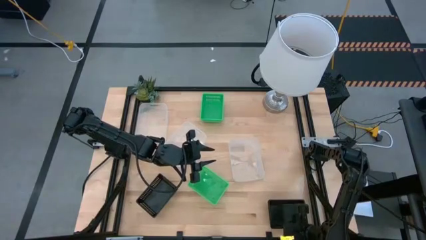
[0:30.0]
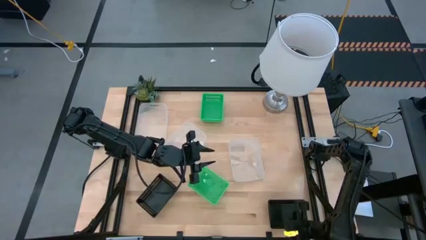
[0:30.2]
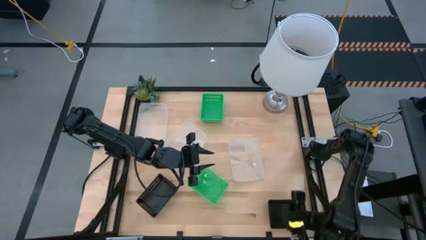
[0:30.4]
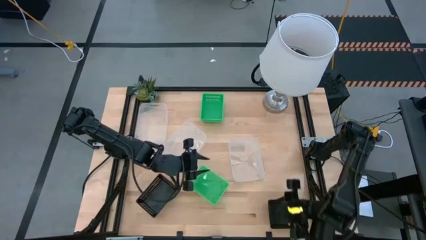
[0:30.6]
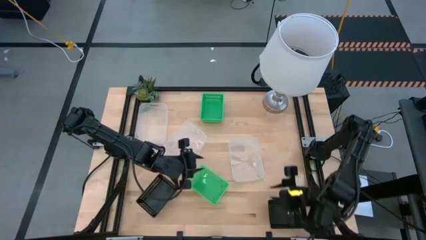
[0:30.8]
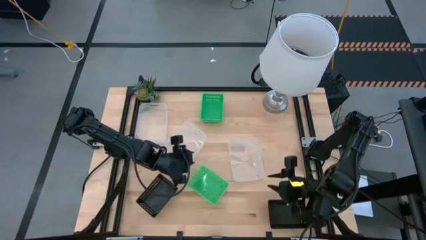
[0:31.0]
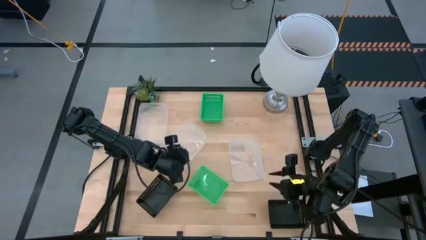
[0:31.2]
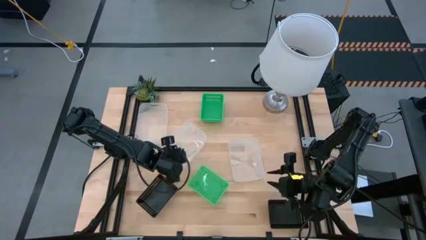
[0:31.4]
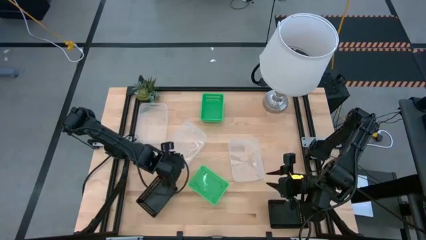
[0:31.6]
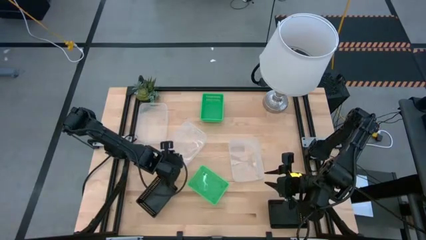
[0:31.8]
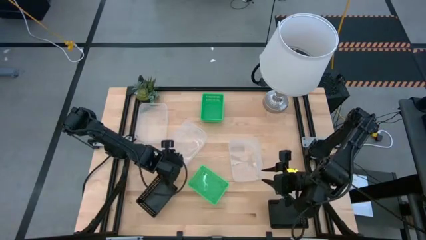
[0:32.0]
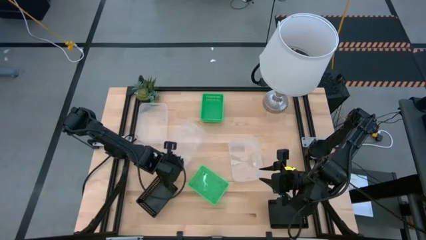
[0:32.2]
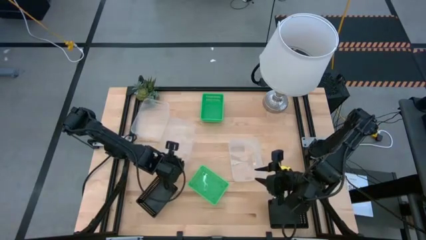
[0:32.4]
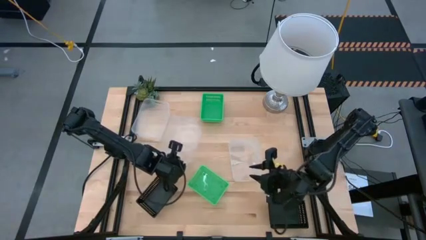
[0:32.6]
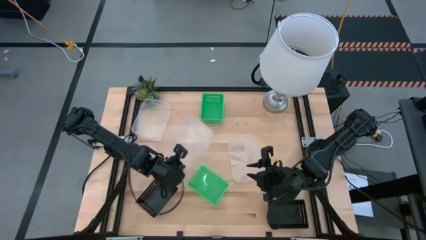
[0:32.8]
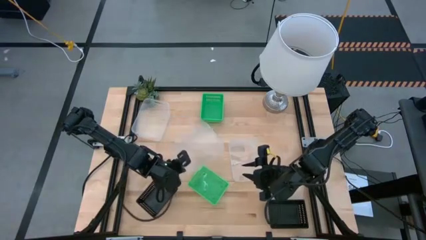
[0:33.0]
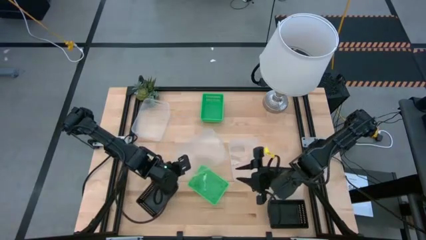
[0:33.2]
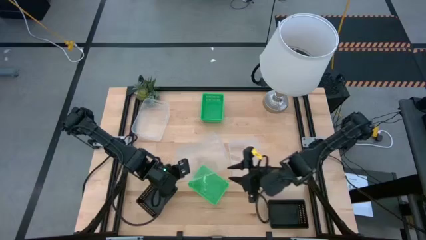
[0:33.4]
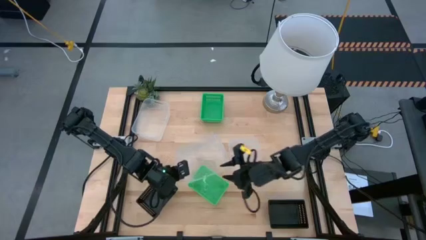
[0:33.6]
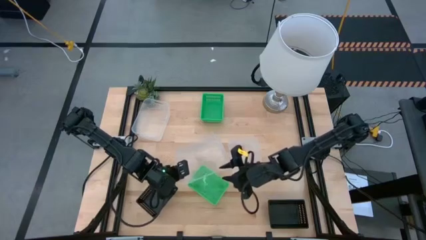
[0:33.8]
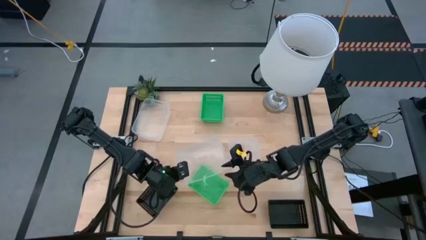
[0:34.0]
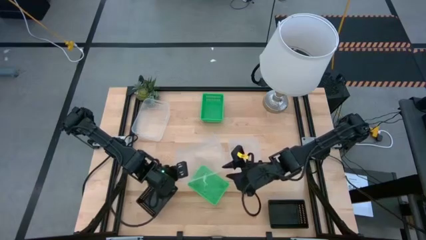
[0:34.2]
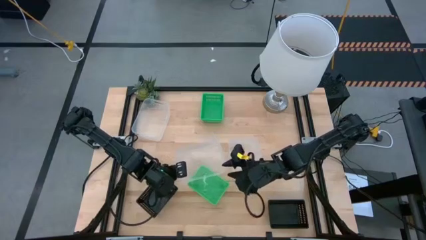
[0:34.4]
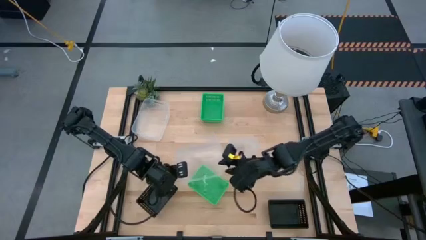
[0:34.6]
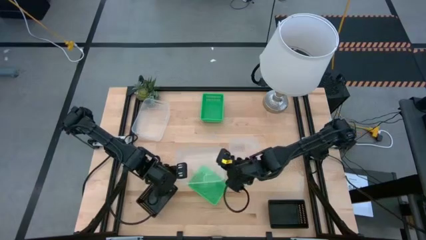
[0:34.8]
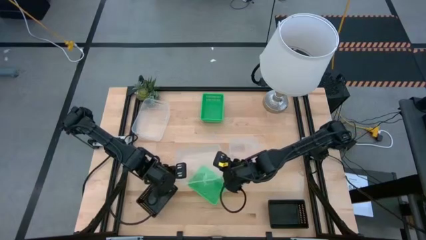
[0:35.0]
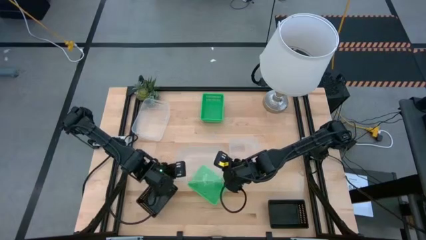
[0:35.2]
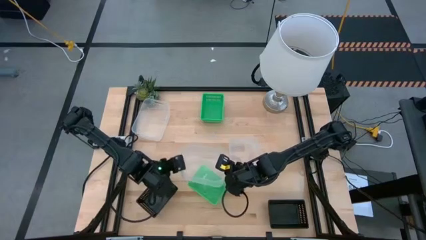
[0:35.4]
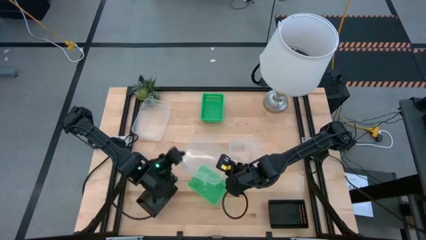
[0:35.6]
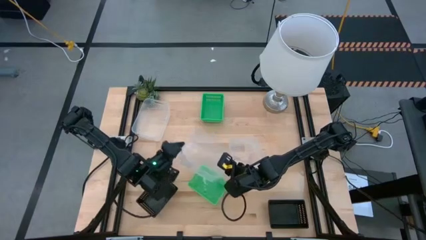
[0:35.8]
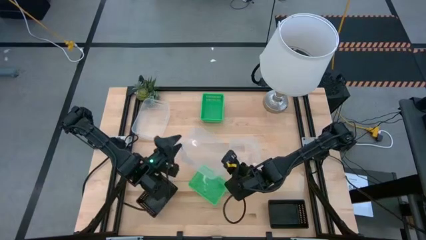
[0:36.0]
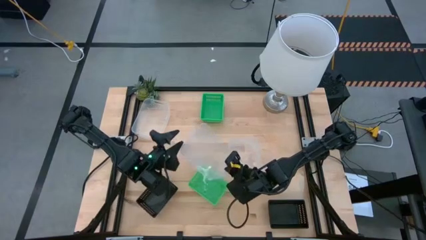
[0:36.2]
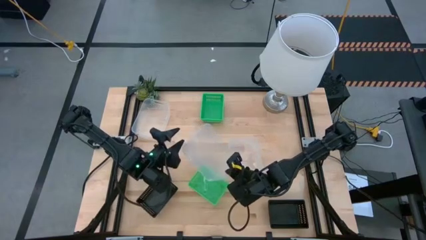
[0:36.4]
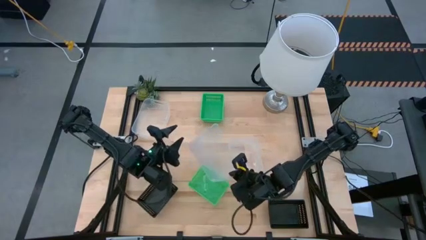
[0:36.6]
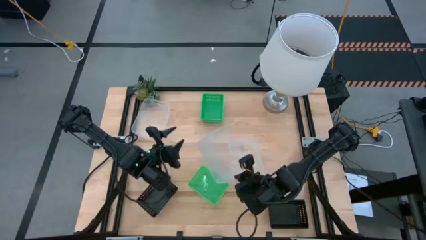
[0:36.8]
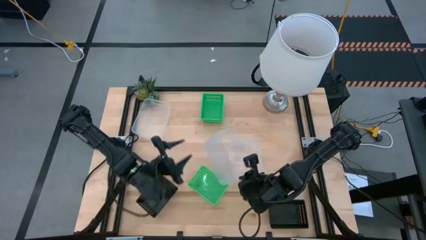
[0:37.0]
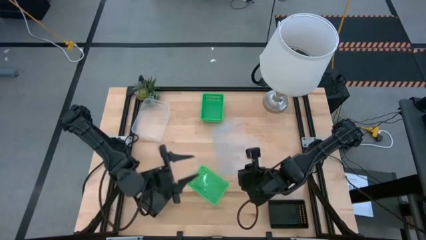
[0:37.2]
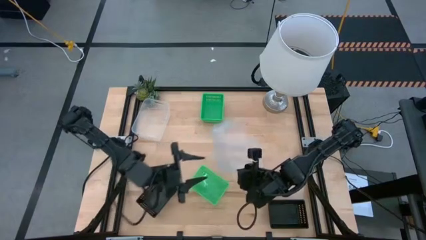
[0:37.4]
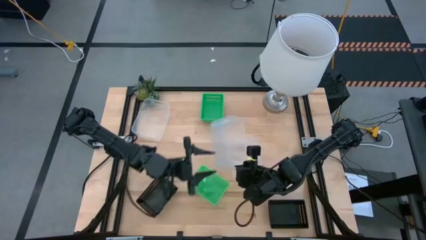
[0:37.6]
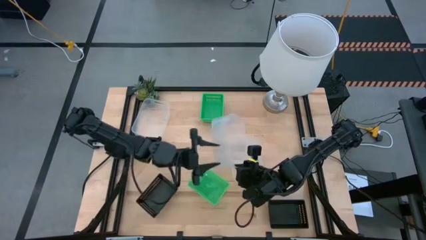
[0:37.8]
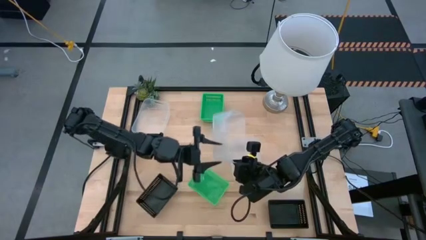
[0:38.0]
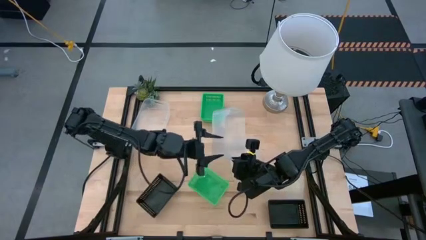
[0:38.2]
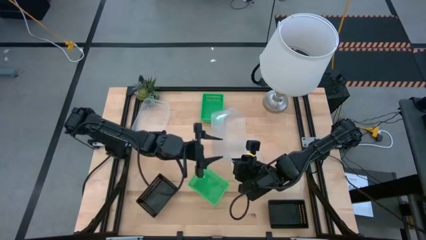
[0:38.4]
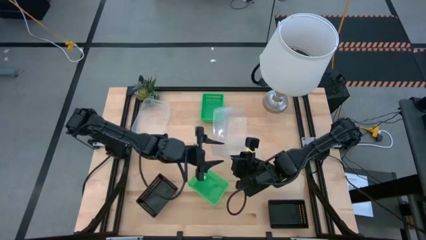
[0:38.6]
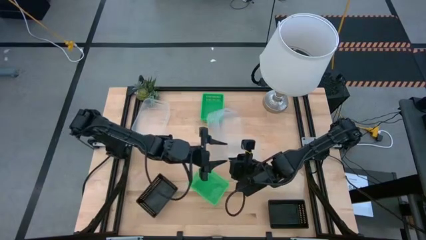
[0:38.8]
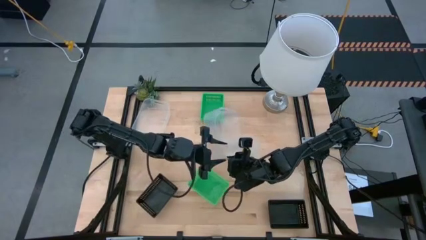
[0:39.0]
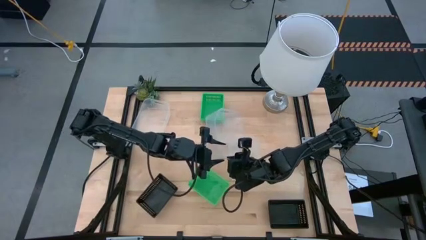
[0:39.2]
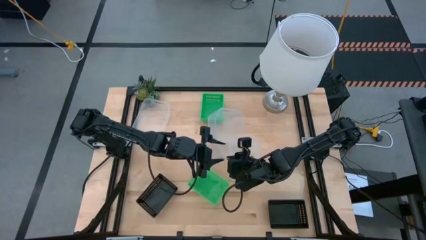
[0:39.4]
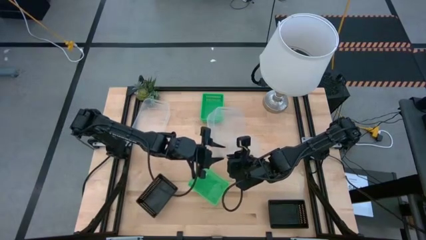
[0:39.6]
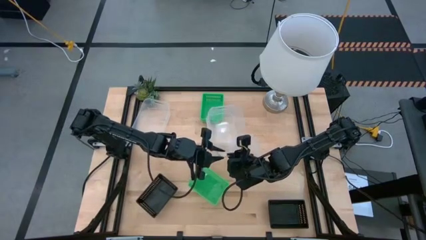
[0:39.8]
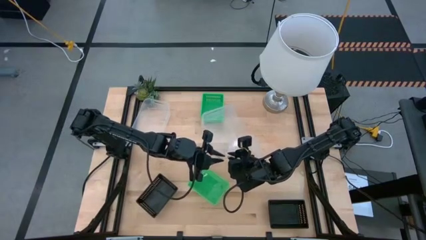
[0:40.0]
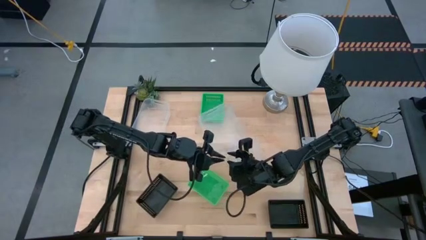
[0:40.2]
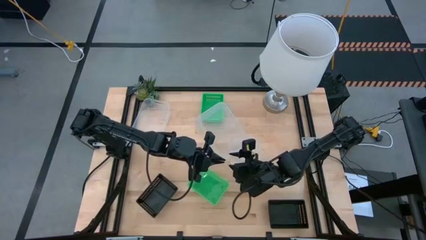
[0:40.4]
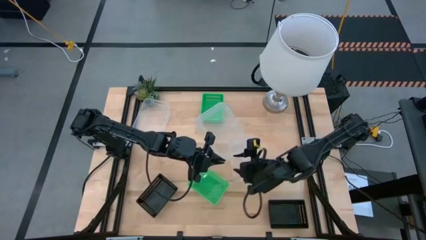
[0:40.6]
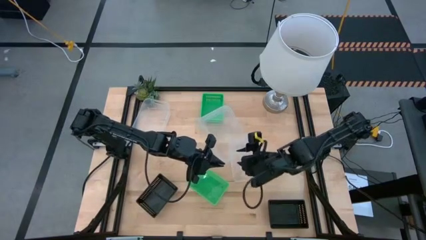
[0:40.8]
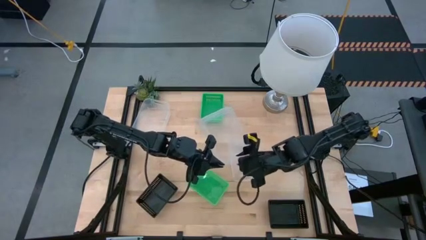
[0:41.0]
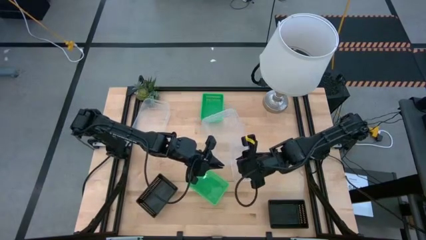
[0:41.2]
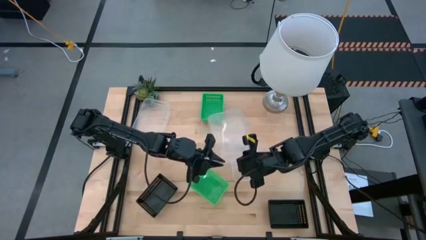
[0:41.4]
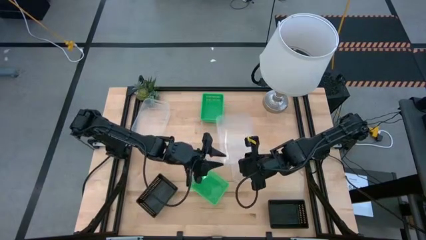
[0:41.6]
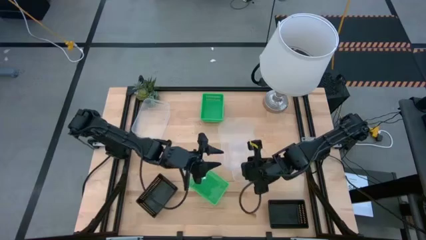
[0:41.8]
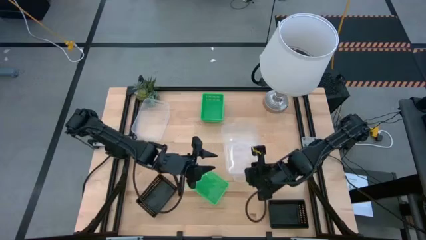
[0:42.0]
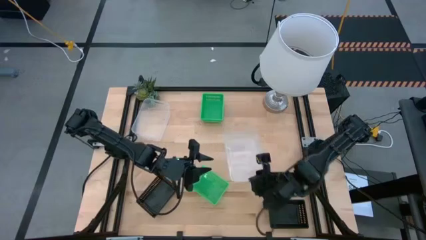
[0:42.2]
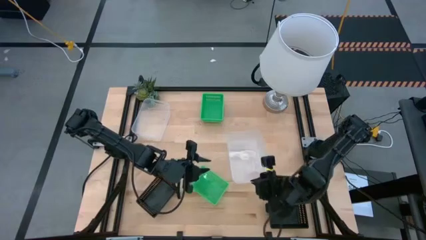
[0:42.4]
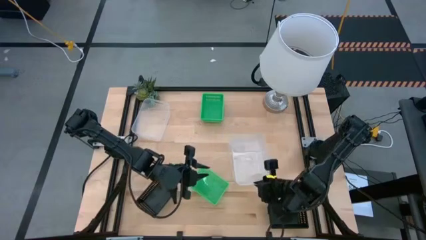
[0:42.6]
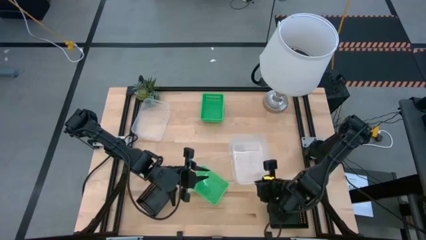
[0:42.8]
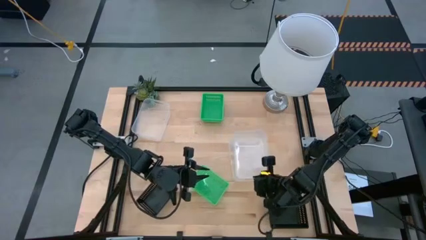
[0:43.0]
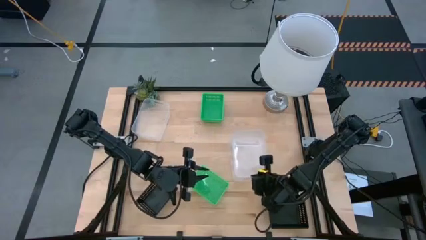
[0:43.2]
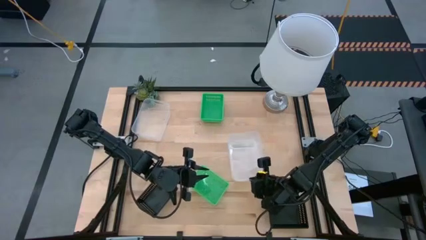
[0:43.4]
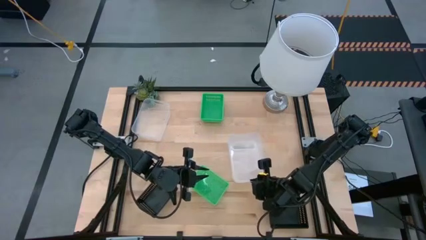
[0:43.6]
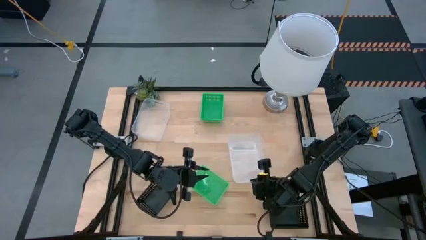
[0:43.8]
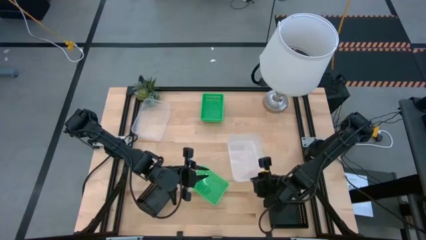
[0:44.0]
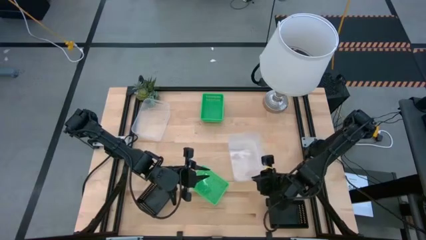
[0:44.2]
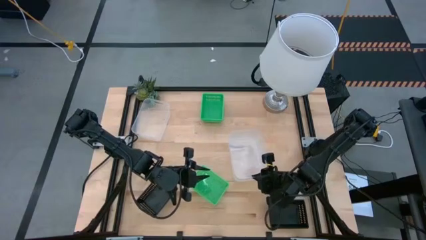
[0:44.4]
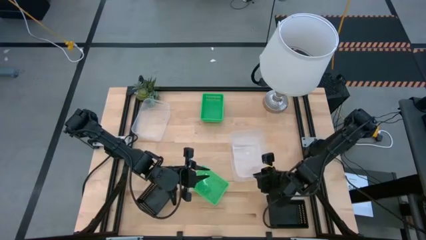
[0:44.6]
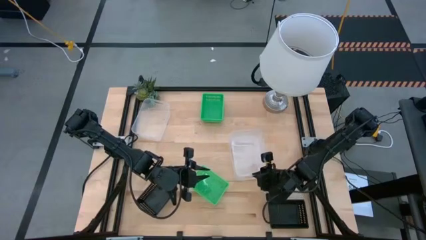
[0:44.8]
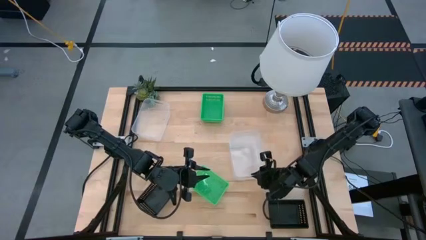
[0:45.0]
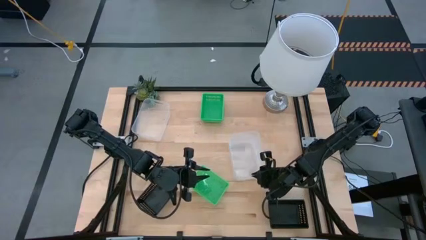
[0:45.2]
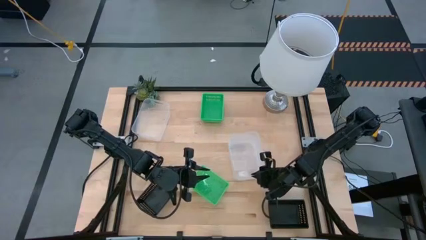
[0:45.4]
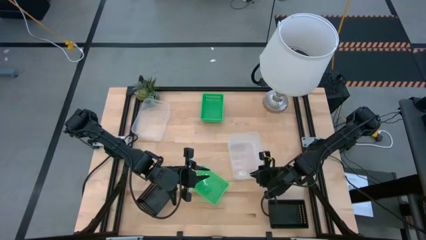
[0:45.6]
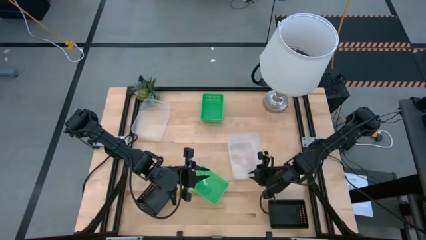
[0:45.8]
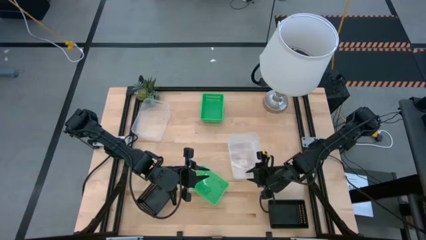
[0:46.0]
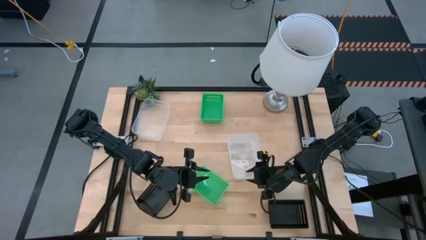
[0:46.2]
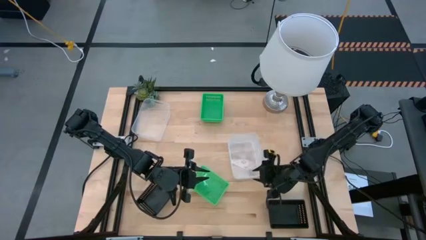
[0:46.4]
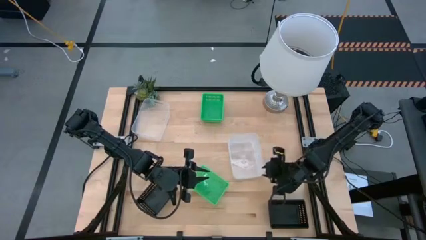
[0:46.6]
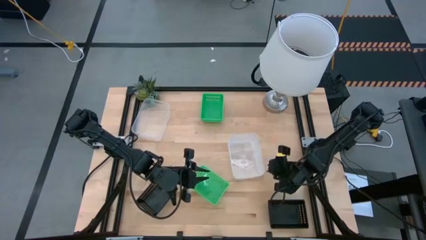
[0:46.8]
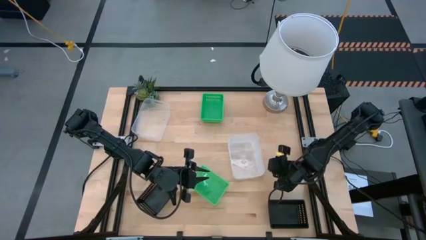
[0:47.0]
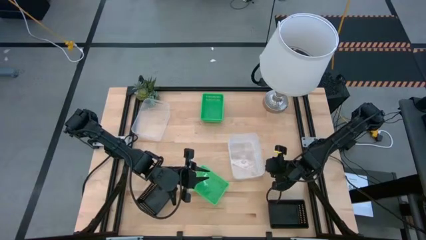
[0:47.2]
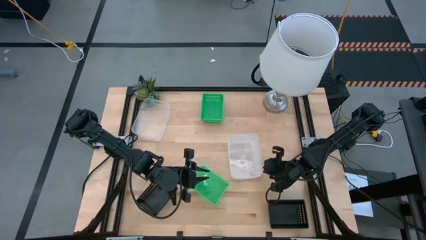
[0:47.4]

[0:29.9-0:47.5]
Stack the middle transparent bin on top of the right transparent bin
